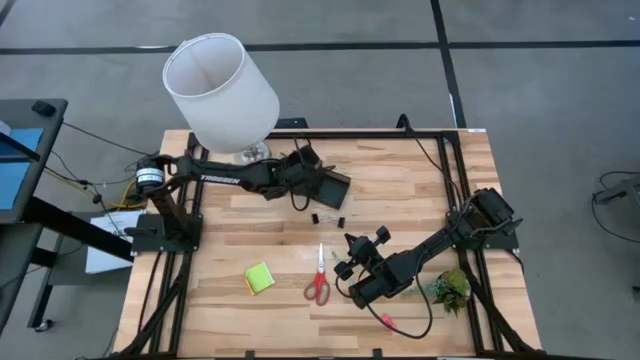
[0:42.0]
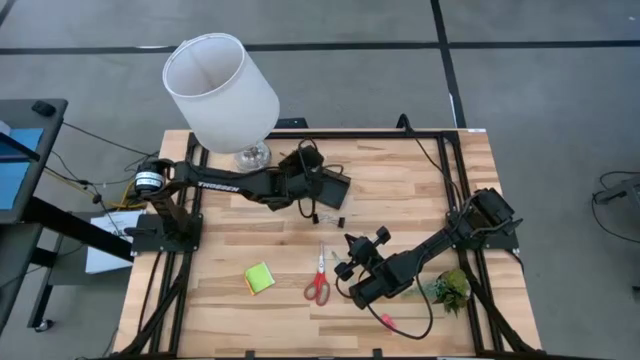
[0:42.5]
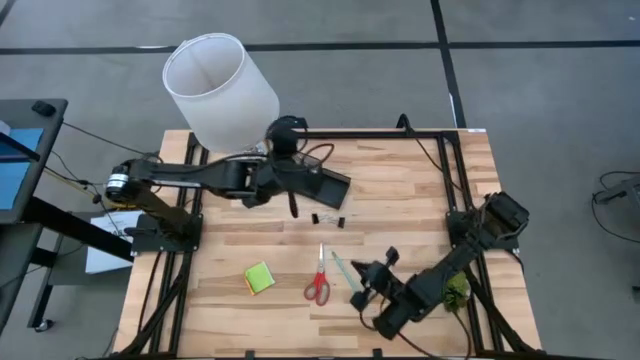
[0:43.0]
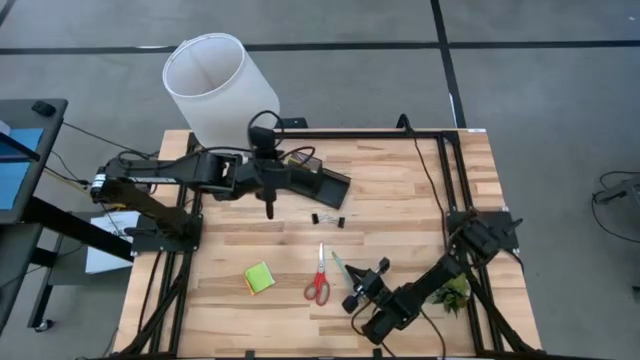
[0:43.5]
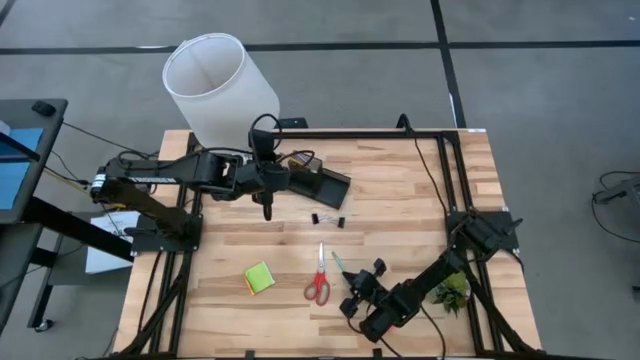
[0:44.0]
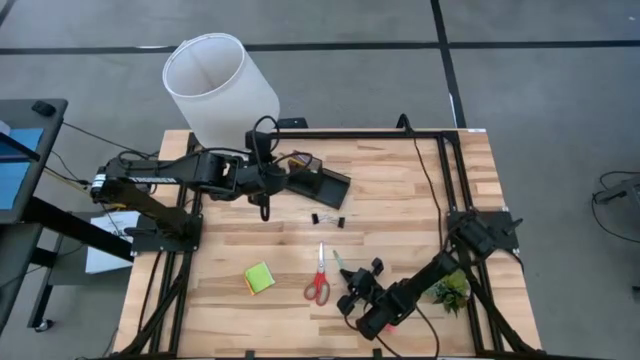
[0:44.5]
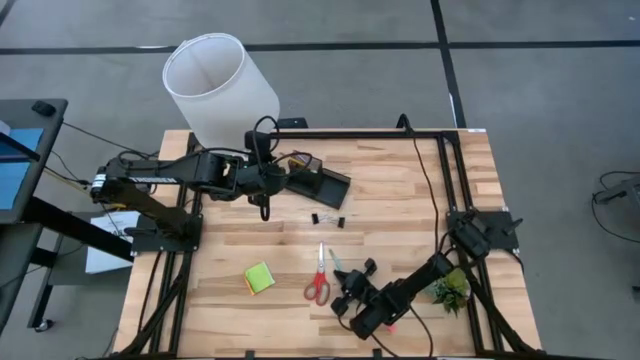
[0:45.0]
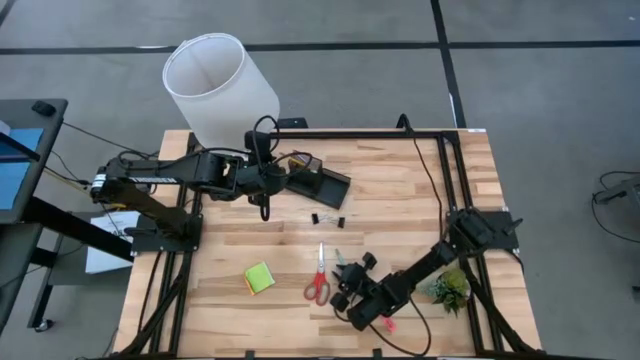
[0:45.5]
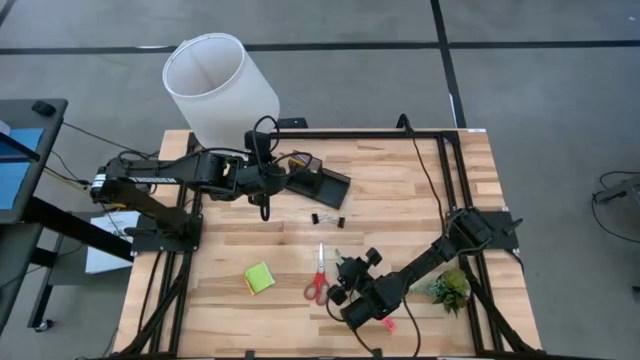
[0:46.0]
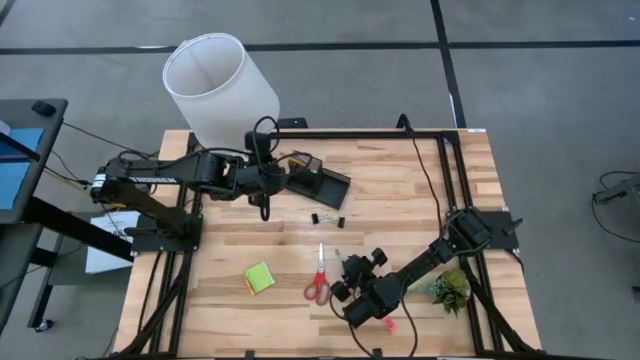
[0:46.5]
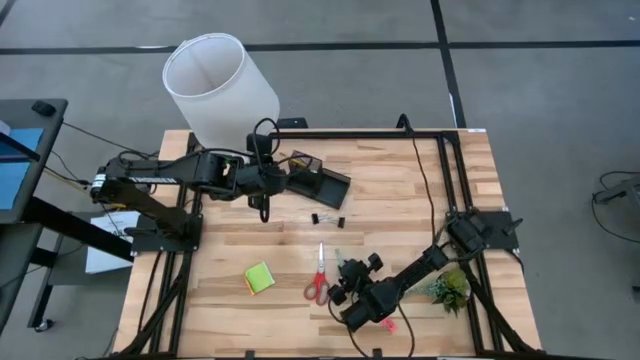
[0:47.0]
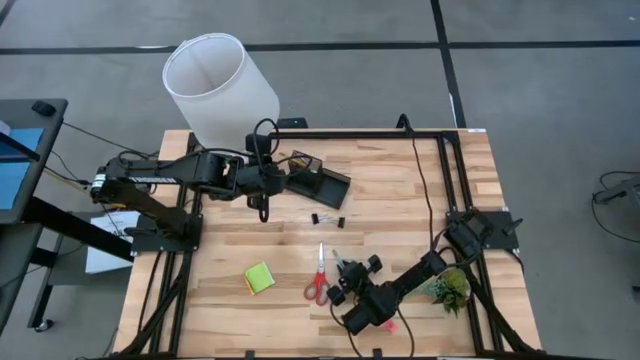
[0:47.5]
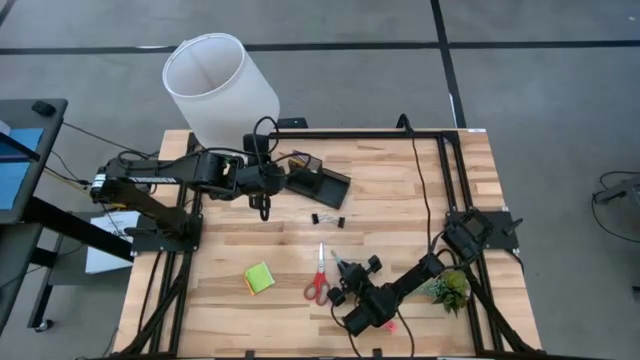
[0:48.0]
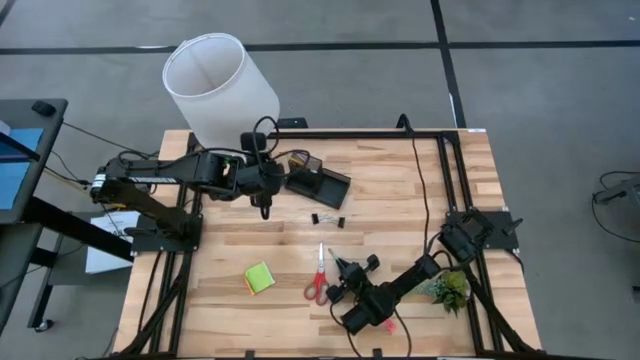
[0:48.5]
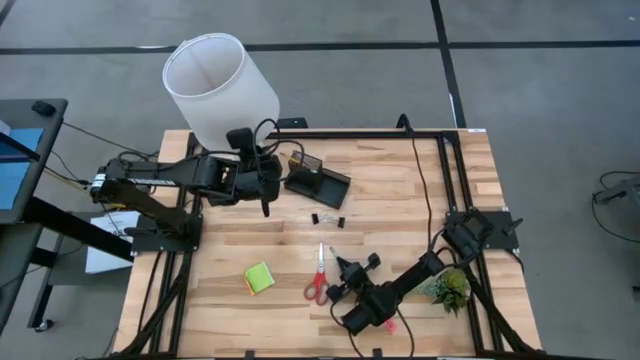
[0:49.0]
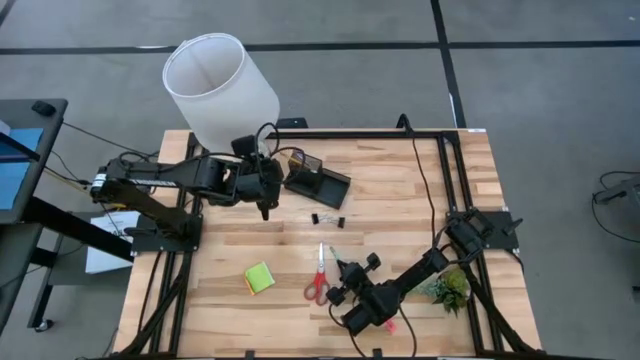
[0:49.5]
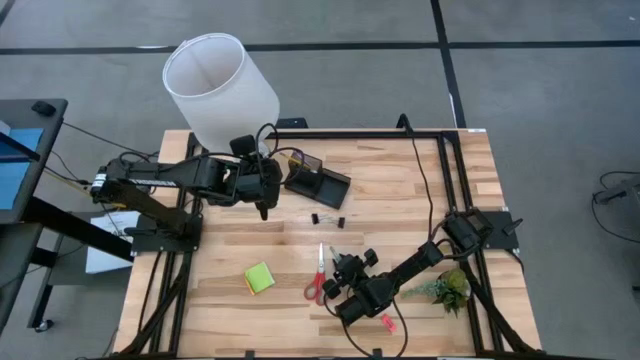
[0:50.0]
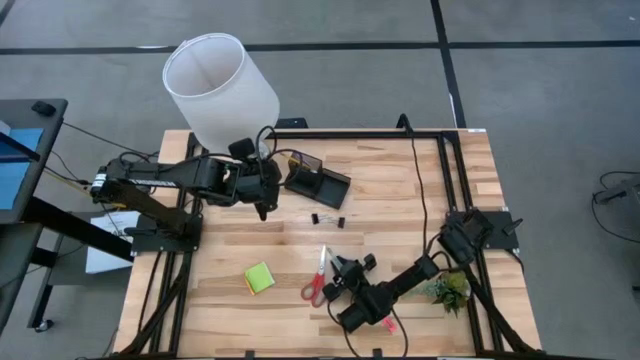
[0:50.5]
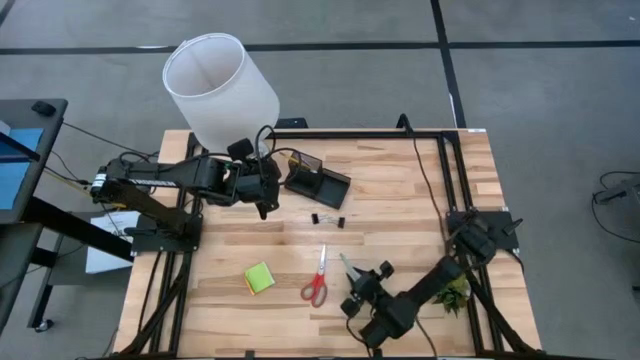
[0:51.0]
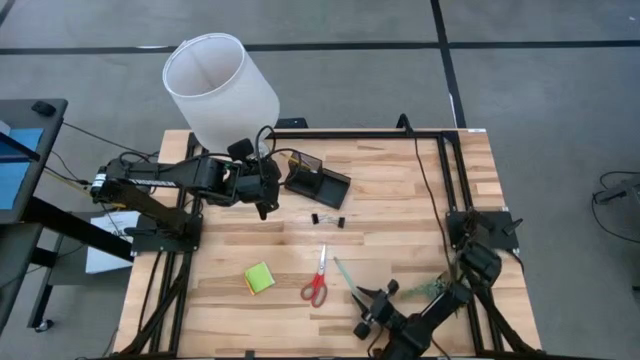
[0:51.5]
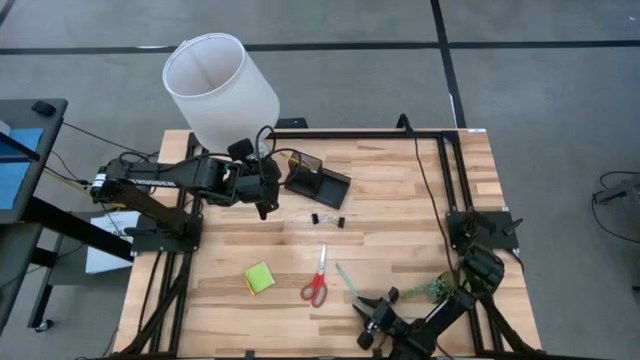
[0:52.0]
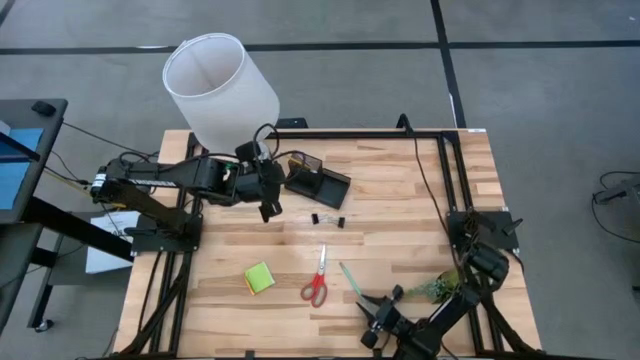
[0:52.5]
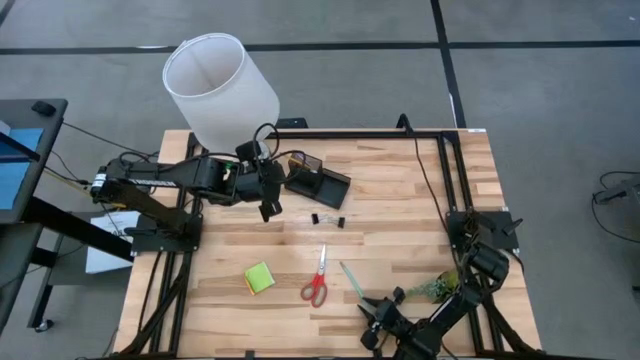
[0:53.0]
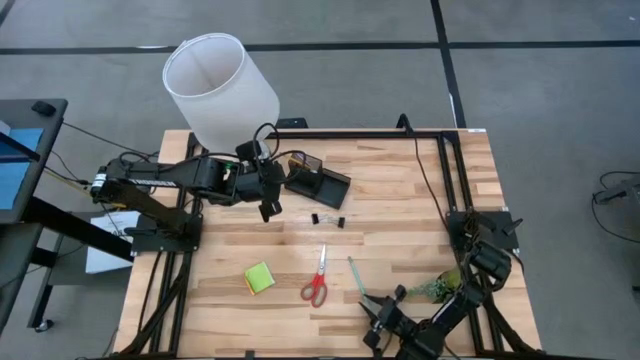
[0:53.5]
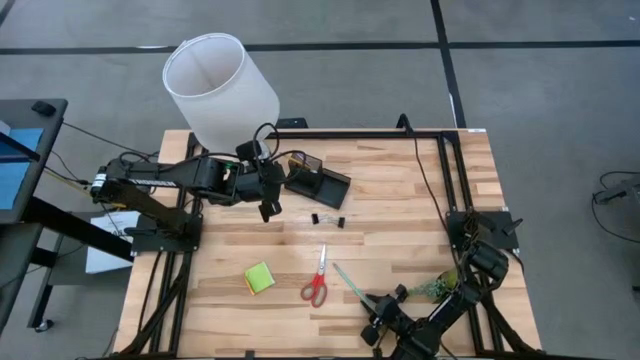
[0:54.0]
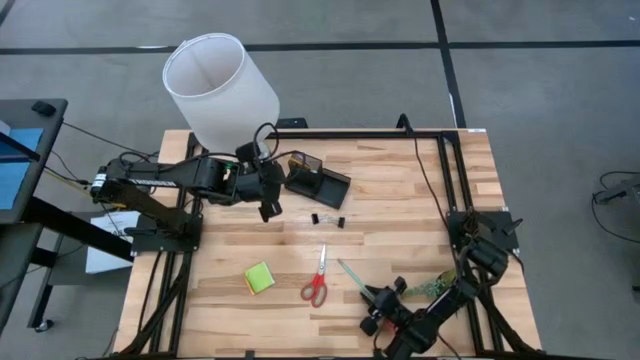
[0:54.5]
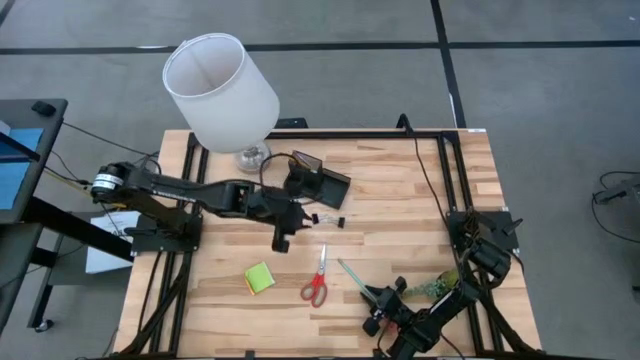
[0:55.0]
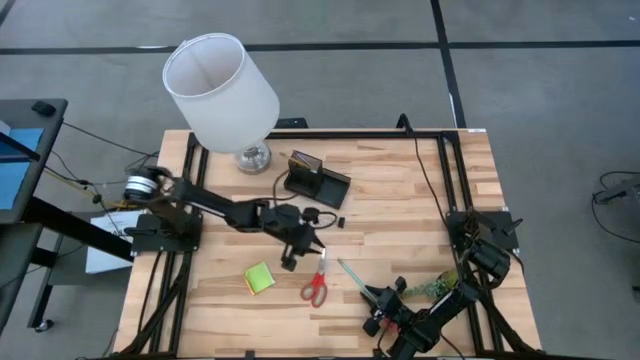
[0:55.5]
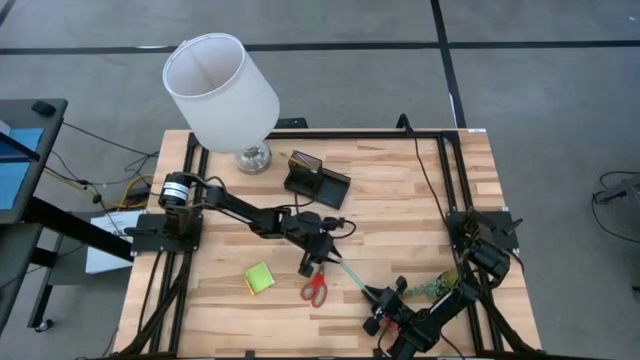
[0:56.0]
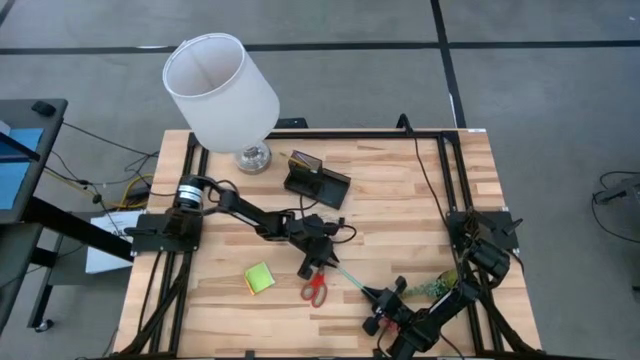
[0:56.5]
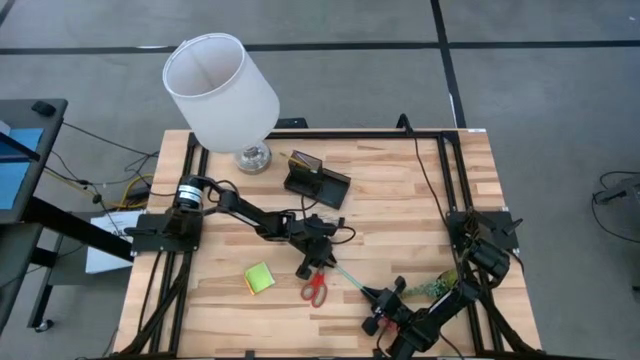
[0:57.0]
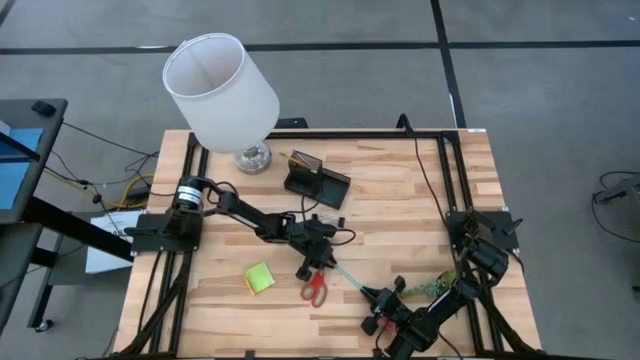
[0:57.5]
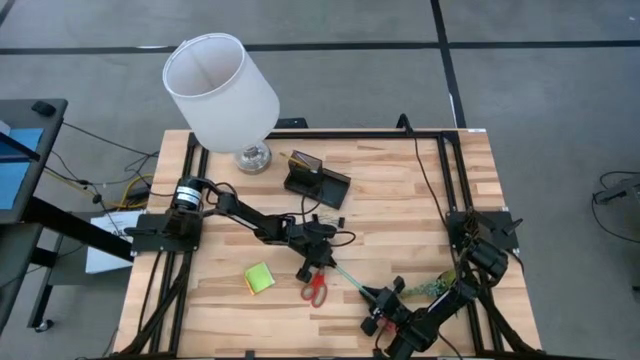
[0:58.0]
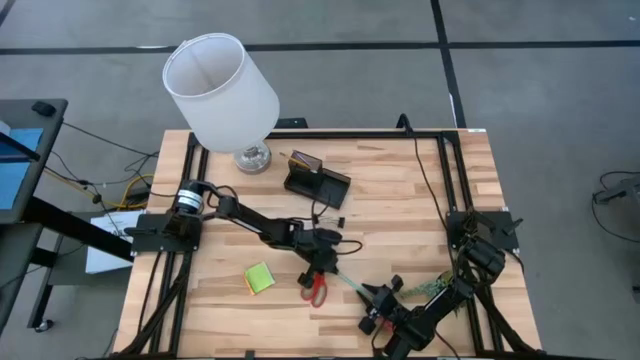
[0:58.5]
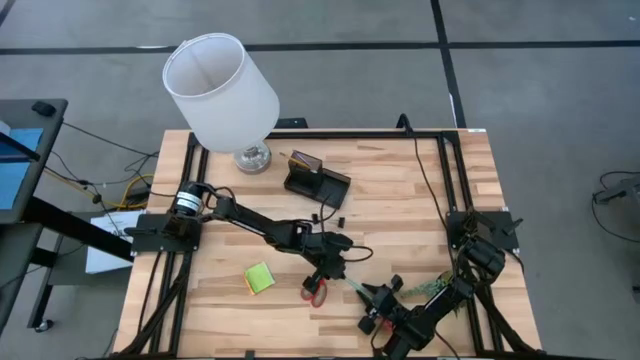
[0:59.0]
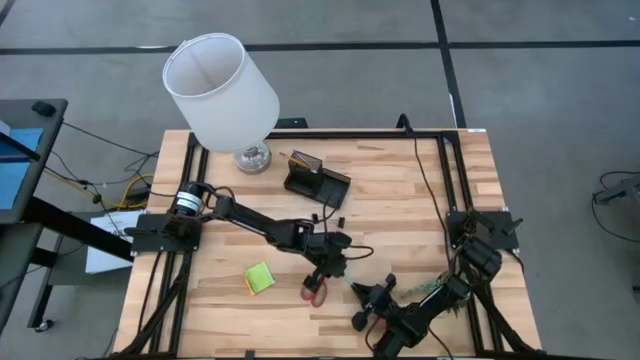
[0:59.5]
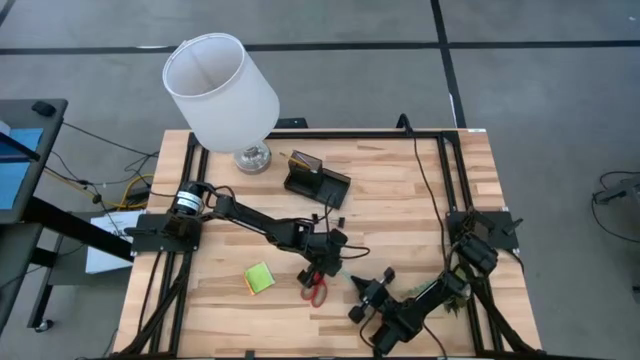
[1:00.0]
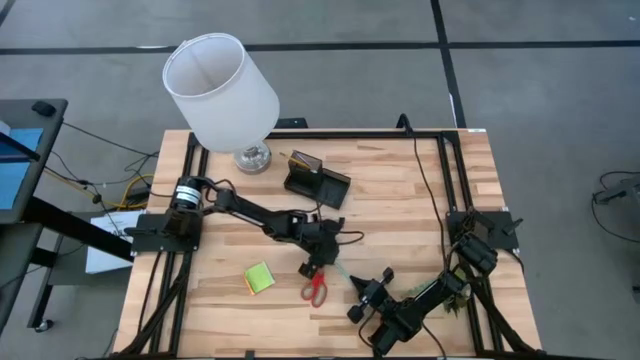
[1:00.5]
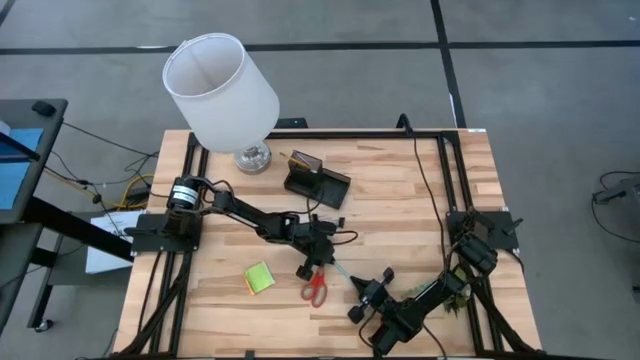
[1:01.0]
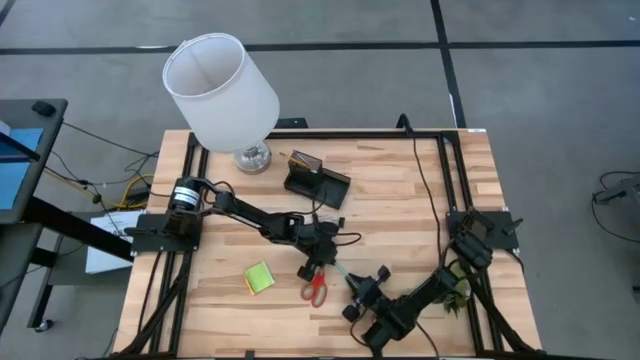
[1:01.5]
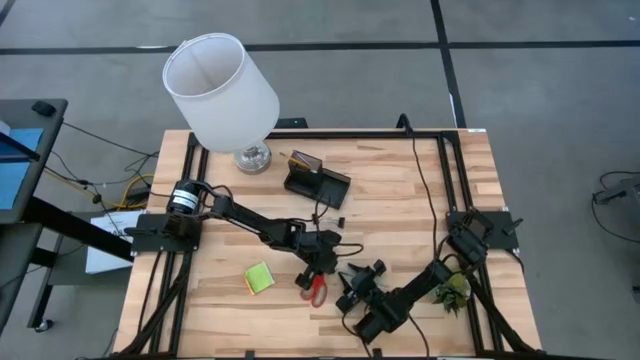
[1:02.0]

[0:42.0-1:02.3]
Task: Pick and place office supplies into organizer
Put the light blue pencil into the black desk organizer

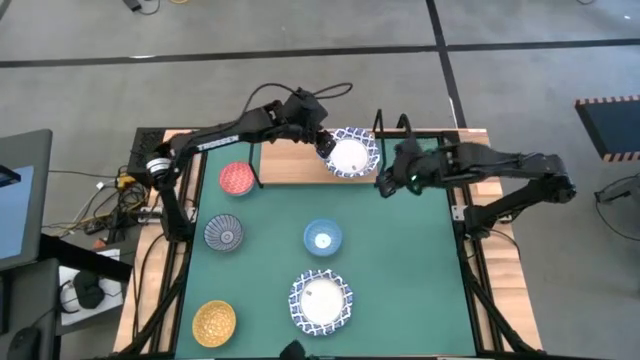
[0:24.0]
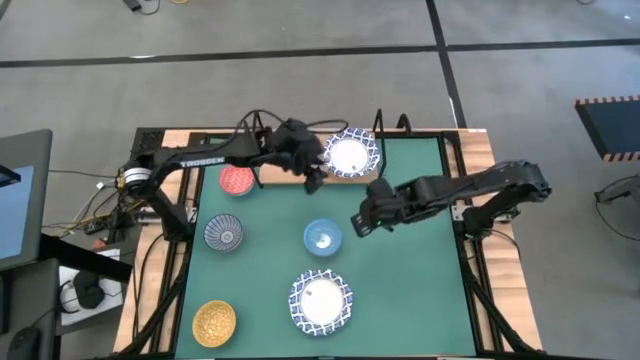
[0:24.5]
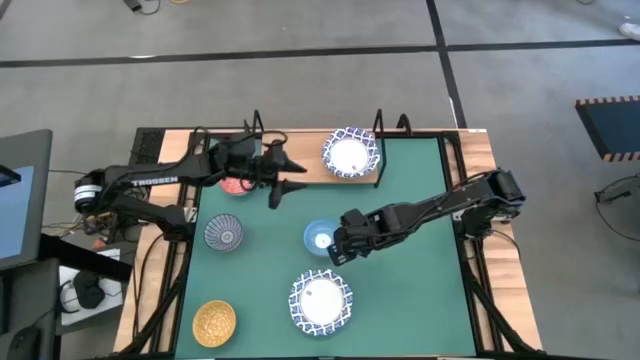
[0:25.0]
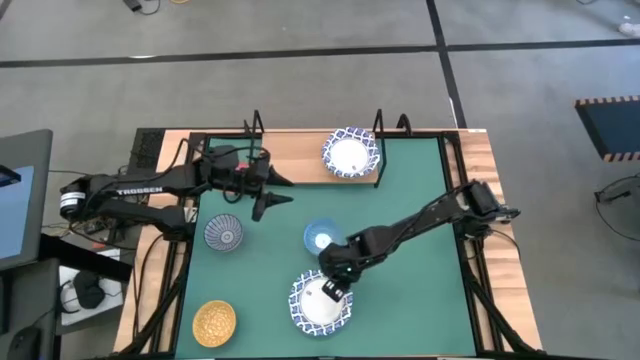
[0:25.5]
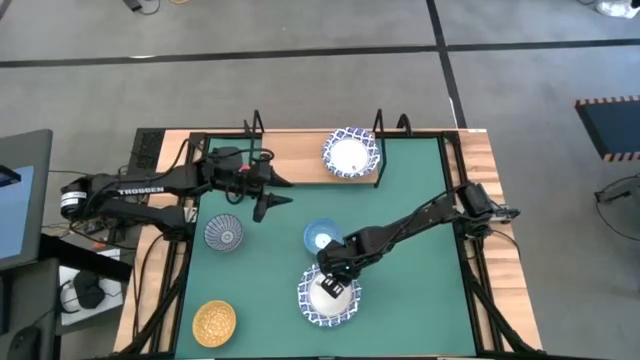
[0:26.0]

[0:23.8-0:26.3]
Task: Place and stack bowls onto a shelf
Stack the white patterned bowl on top of the other white patterned bowl on the shelf
